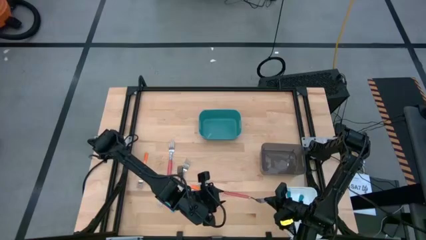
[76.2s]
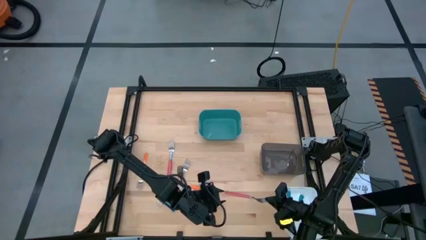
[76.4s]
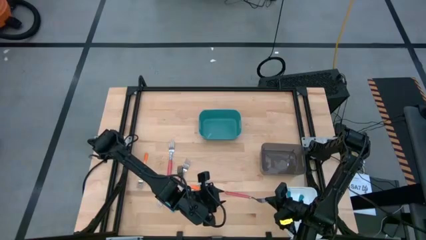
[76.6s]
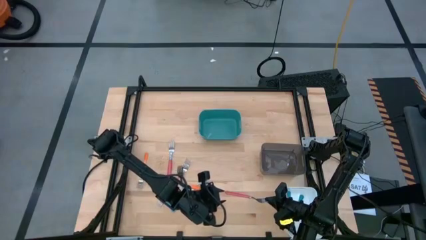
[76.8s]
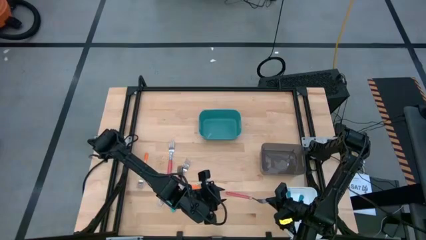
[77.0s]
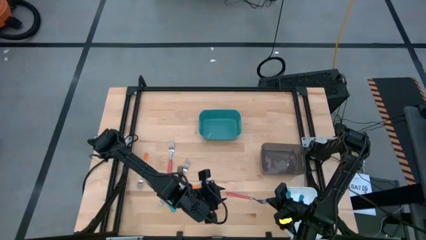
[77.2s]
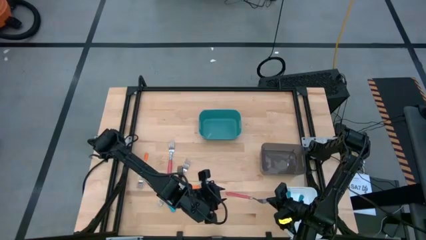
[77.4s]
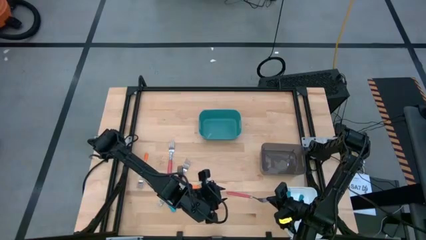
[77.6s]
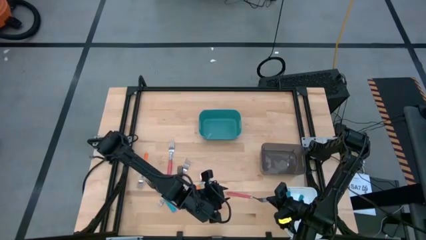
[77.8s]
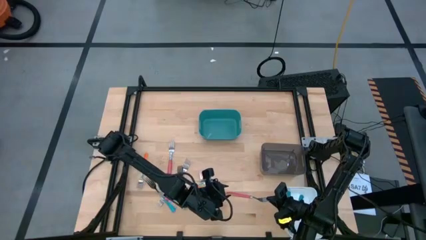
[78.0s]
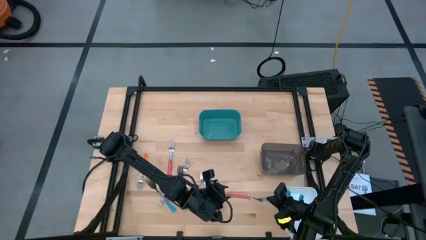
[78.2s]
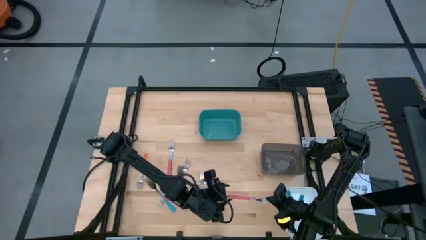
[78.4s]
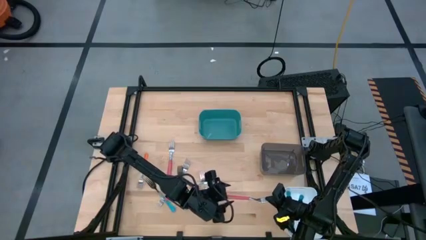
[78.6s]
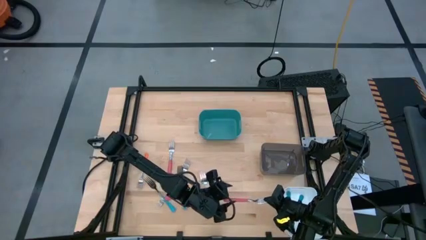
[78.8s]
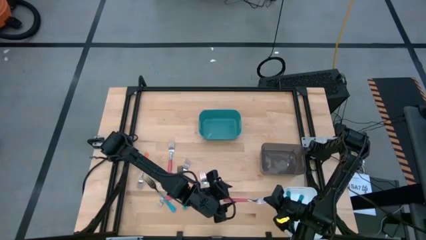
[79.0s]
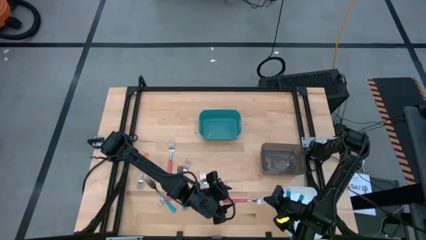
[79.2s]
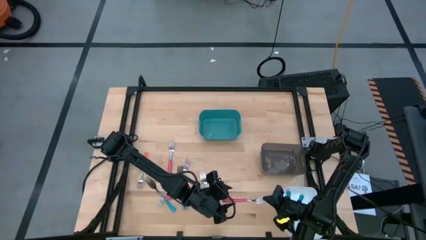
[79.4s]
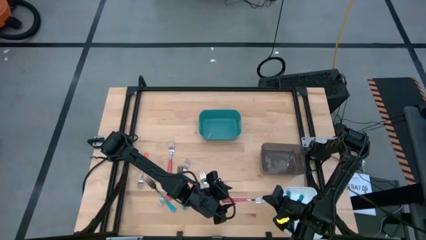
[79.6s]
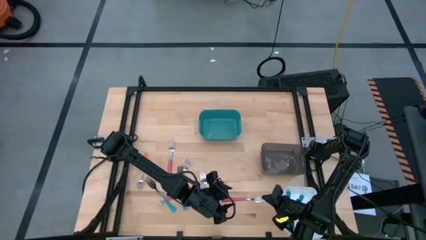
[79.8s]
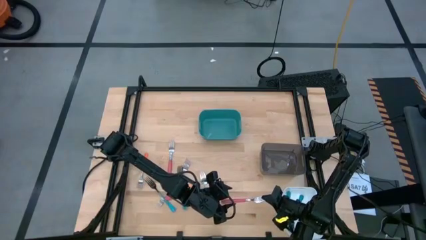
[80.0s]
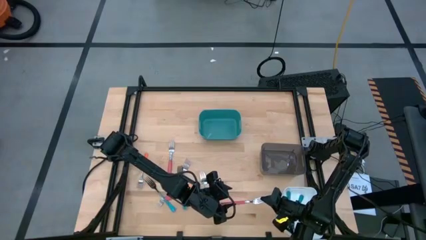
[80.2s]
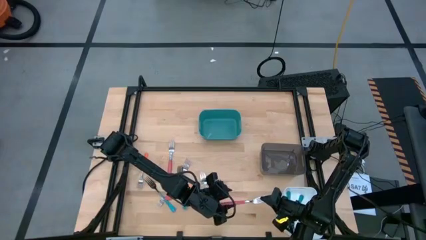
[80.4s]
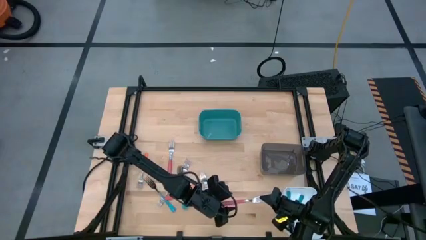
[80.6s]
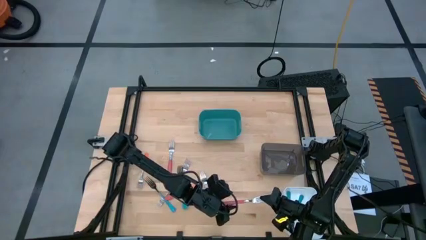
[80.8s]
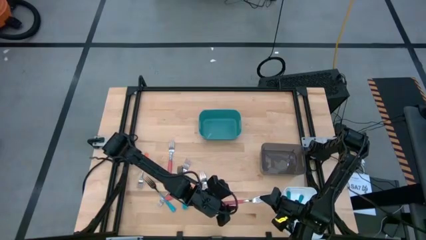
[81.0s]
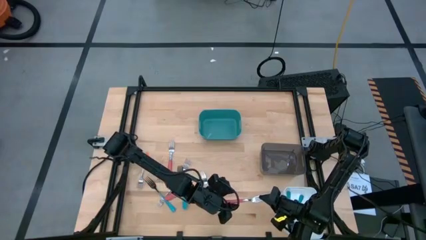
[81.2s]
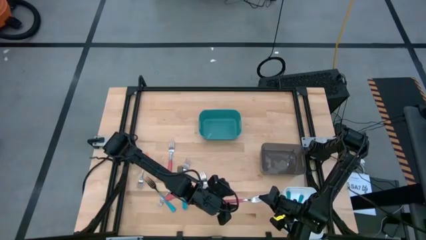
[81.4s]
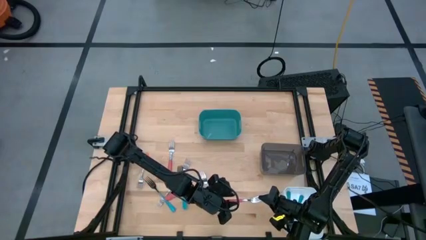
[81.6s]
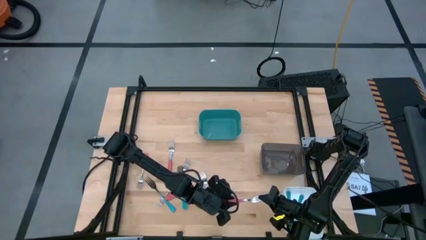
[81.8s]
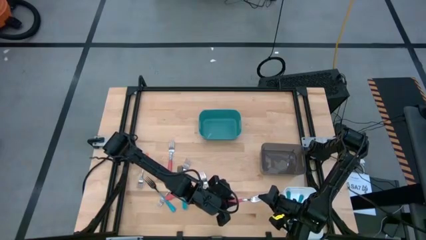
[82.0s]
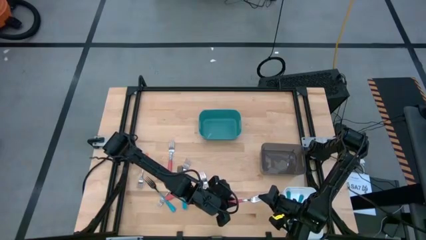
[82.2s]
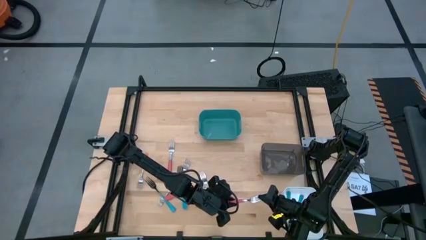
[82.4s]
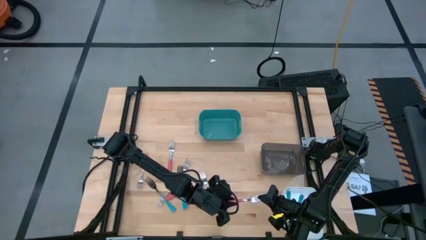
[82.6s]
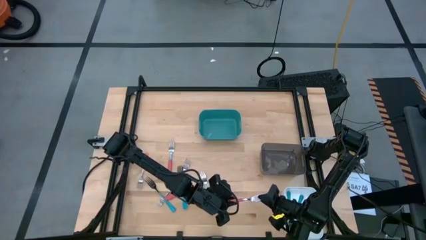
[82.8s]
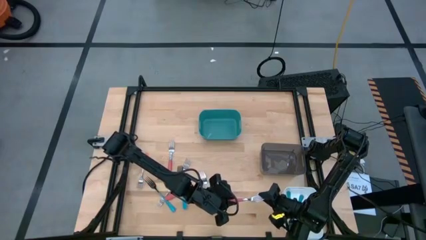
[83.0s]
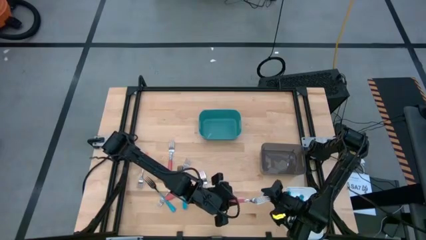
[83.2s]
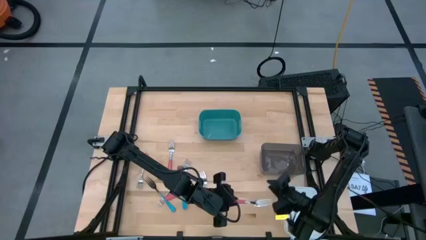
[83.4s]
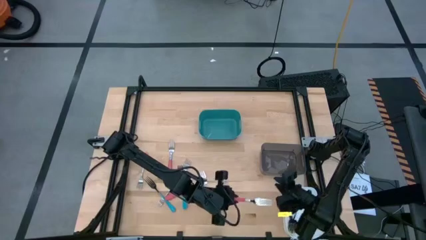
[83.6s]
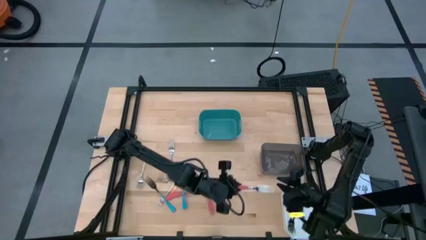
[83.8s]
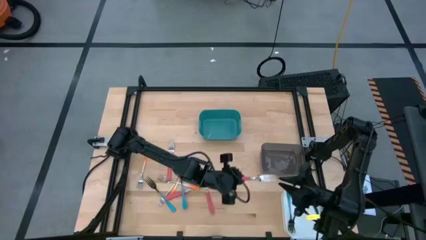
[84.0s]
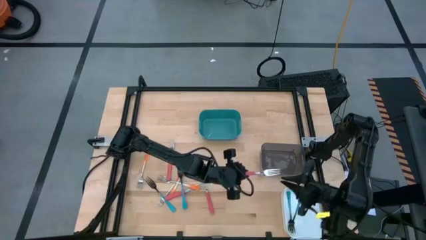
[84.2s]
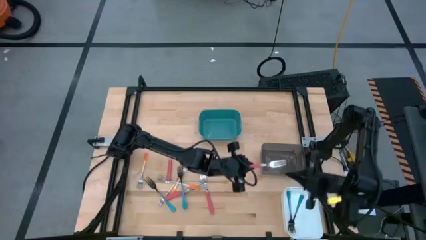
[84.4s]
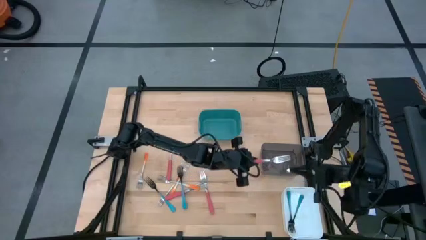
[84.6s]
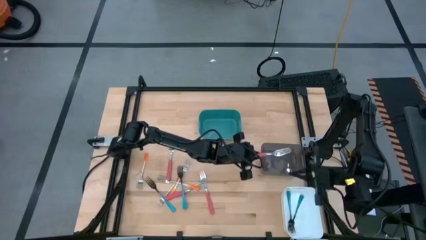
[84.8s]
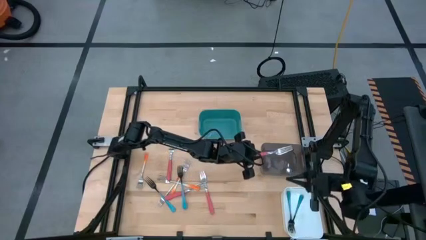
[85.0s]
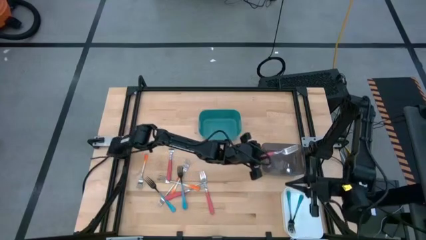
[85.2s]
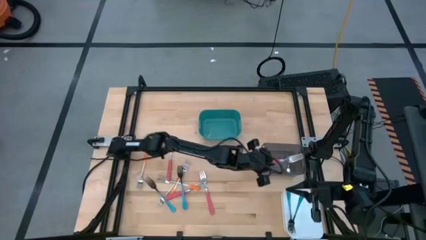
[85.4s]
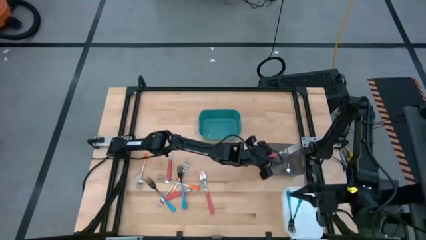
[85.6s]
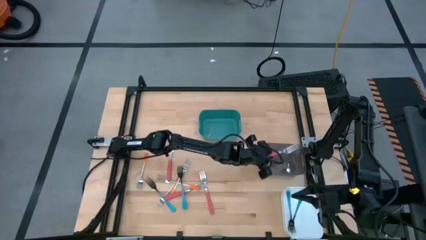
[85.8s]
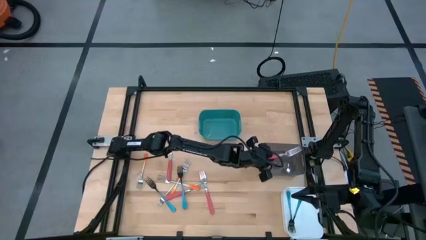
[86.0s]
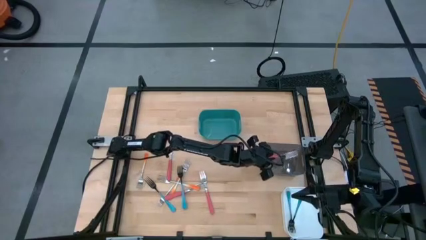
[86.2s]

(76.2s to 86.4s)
Task: Sort silverware by color (type)
Put the pink fork into the black bin
